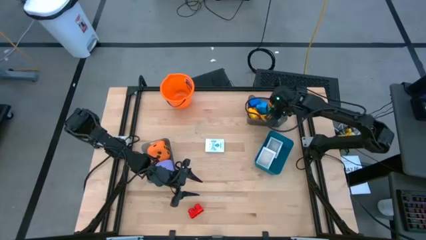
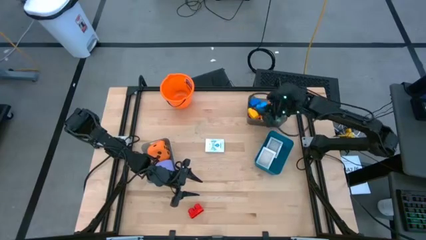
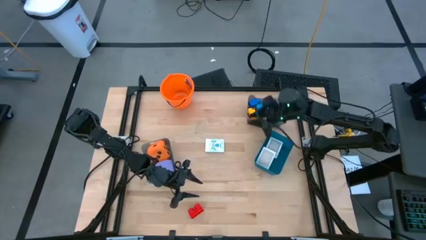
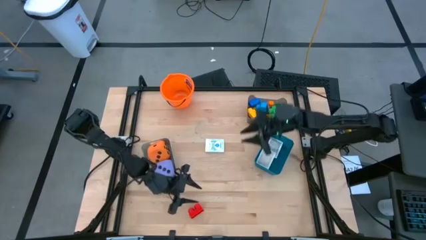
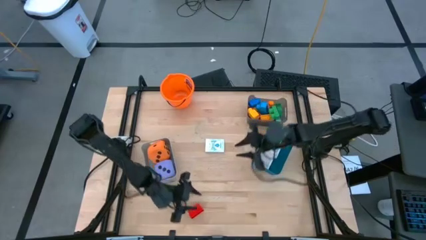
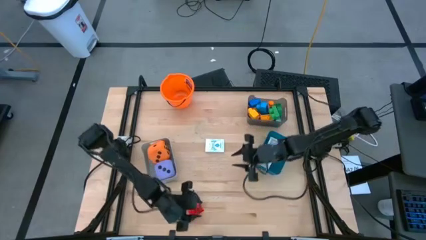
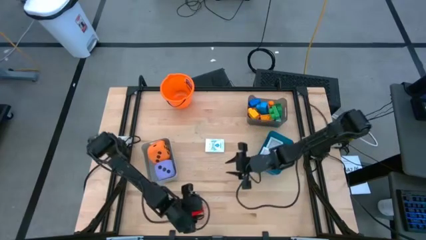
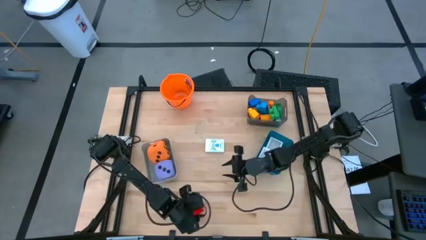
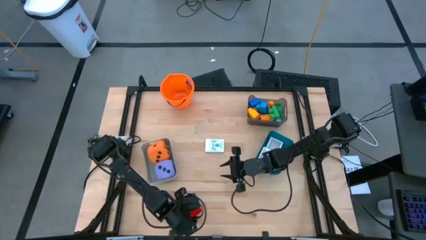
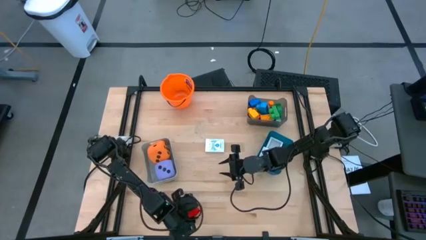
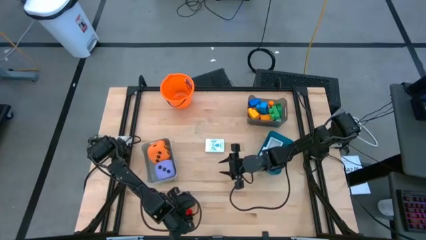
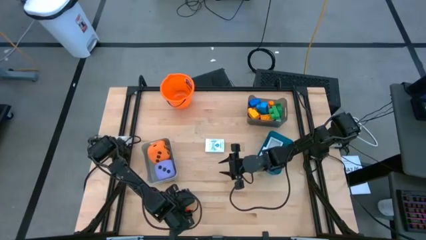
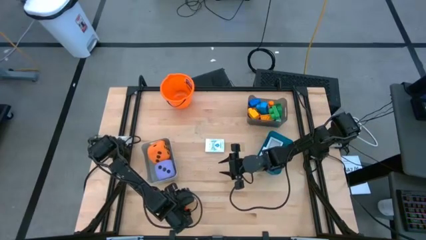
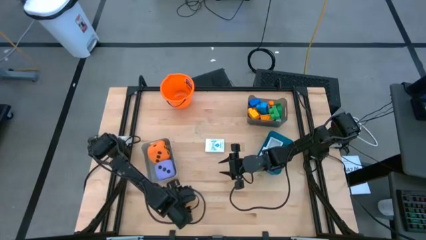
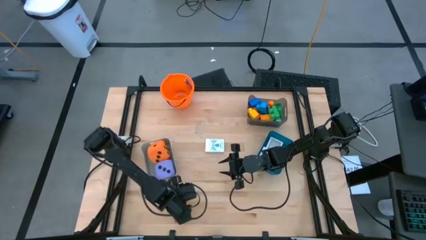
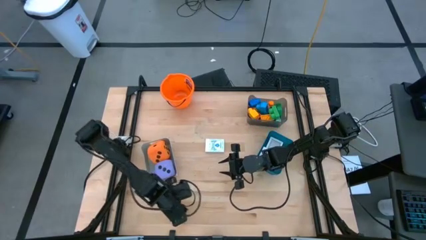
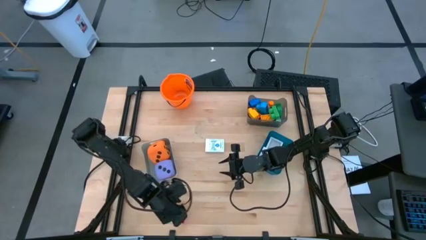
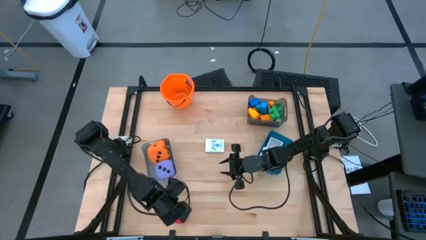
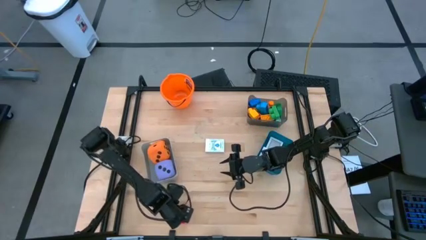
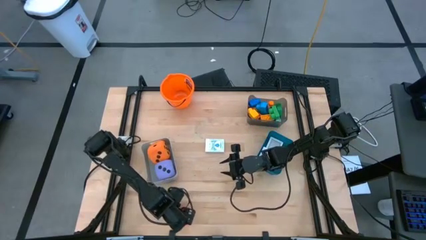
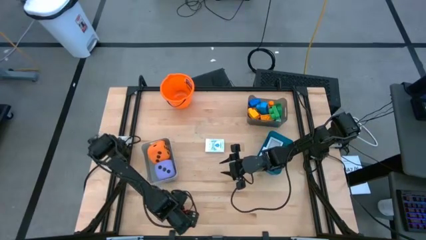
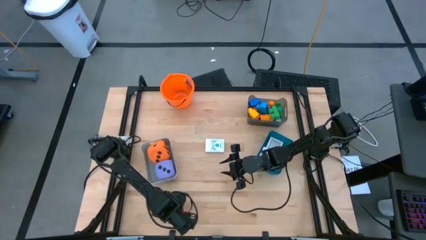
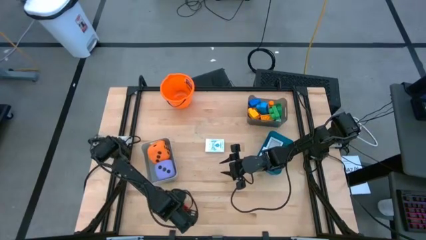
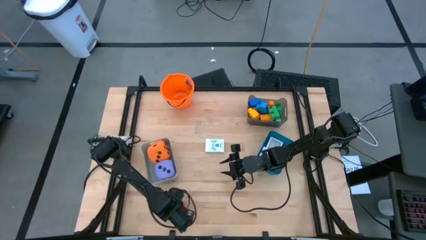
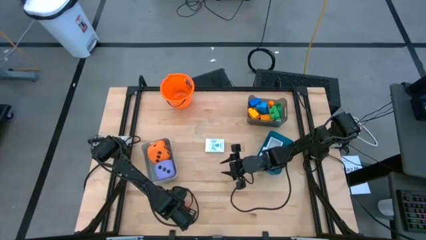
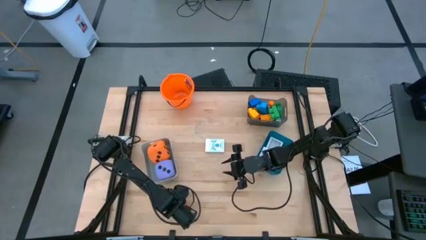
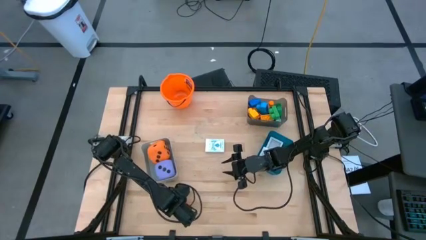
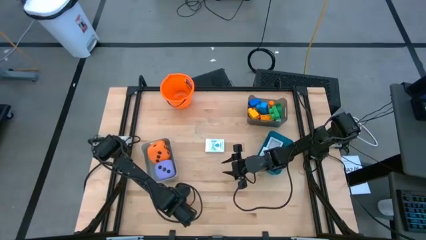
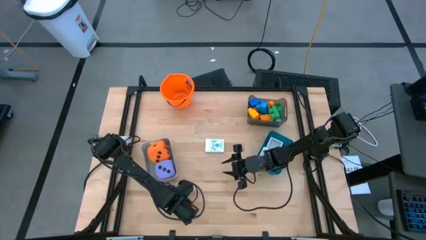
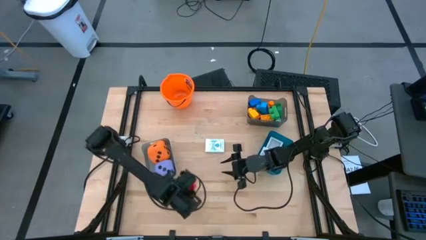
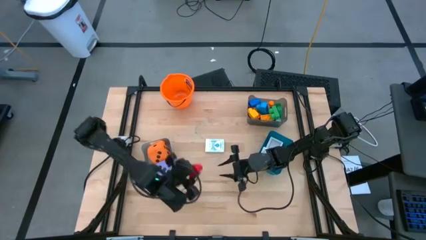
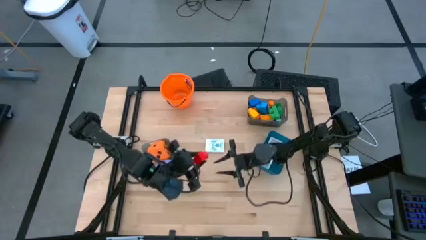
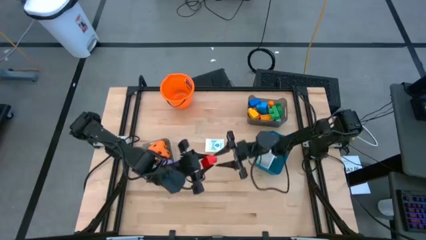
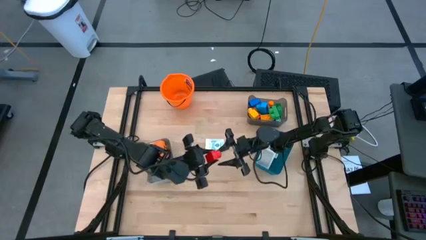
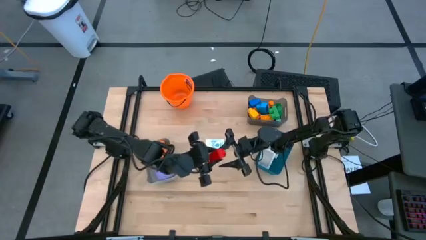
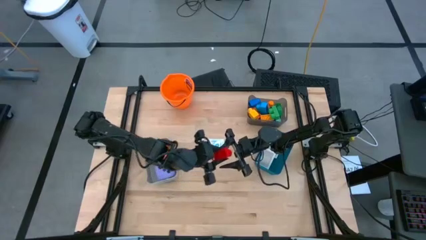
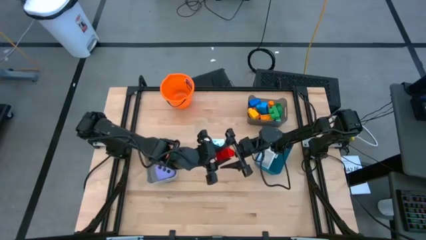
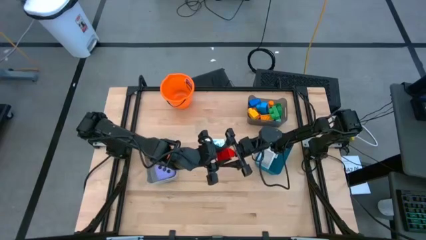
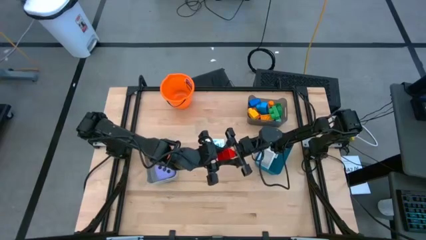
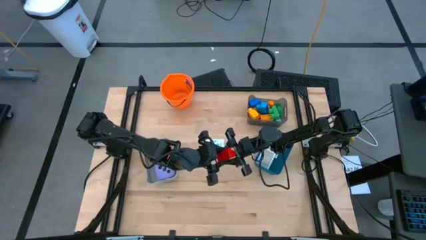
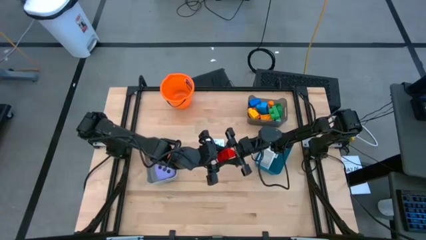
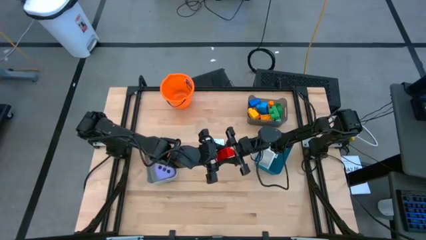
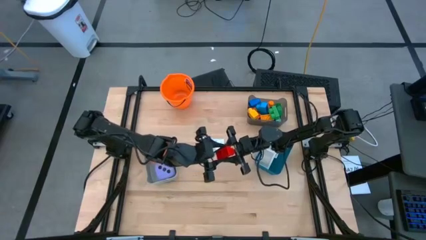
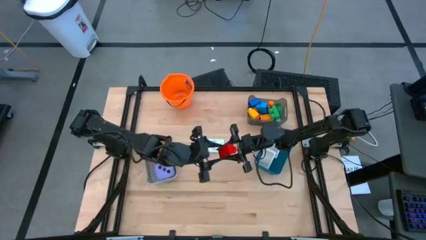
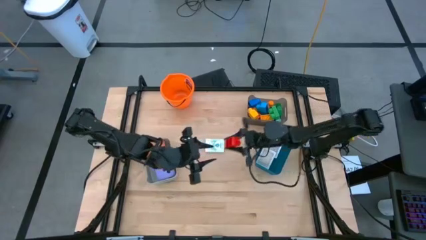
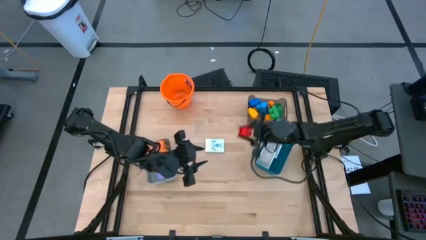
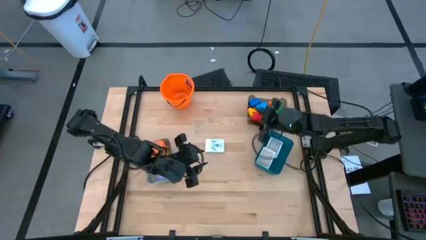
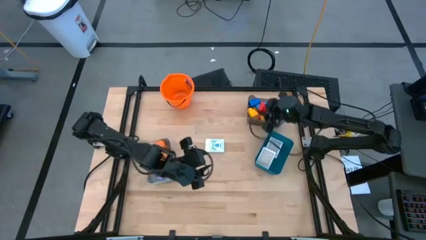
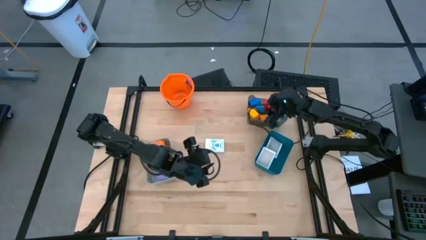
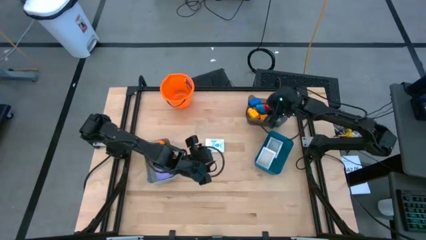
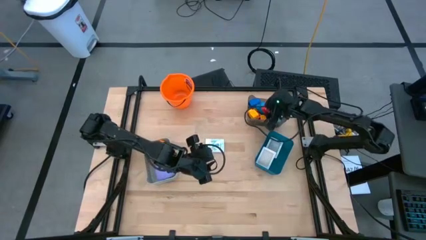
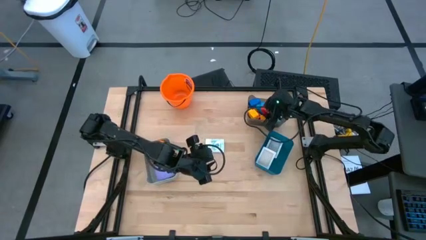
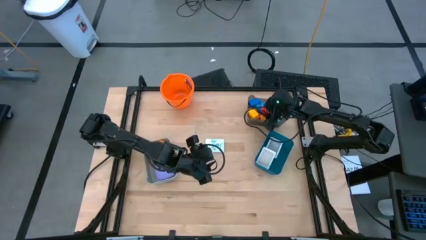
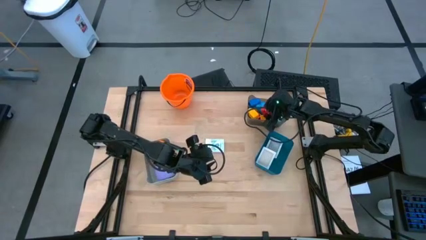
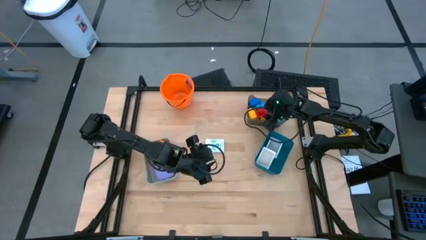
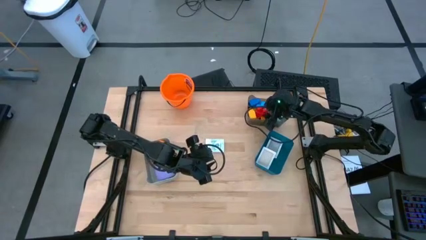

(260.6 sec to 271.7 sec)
Task: Pick & Place Toys
Put the red game piece into the black bin
